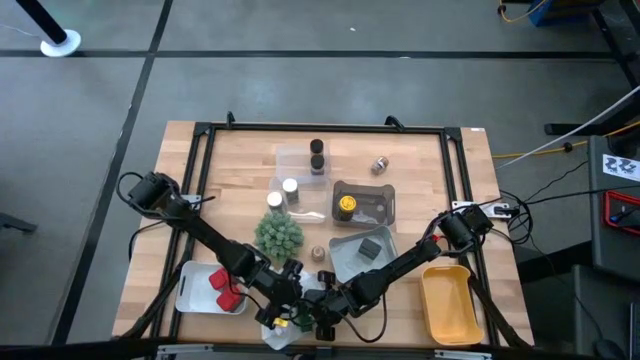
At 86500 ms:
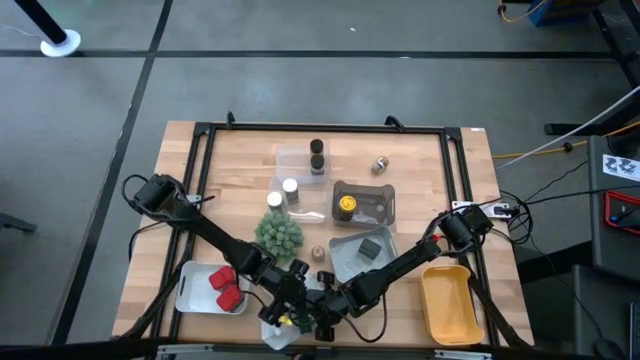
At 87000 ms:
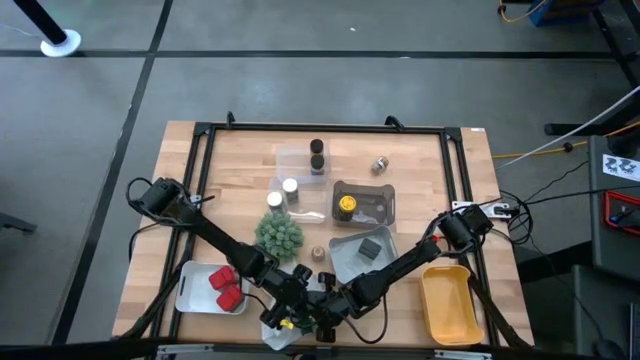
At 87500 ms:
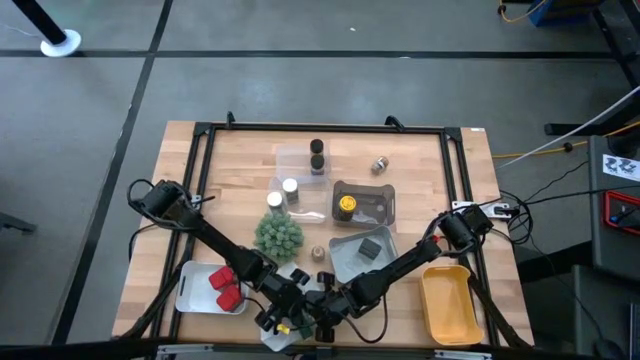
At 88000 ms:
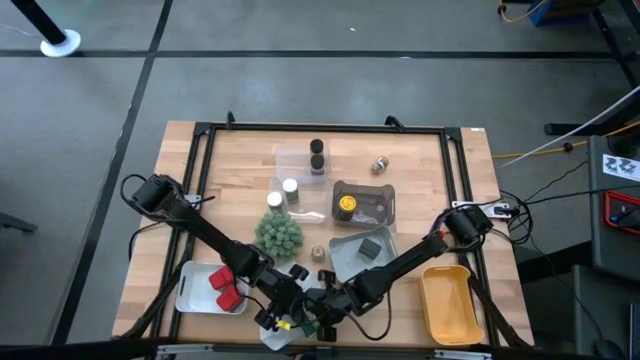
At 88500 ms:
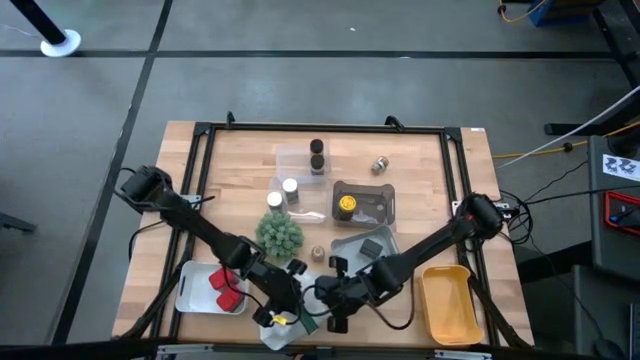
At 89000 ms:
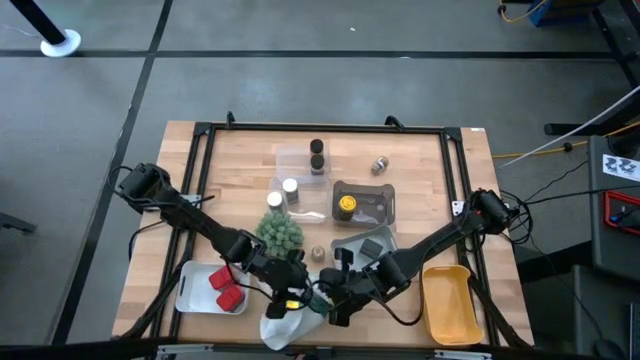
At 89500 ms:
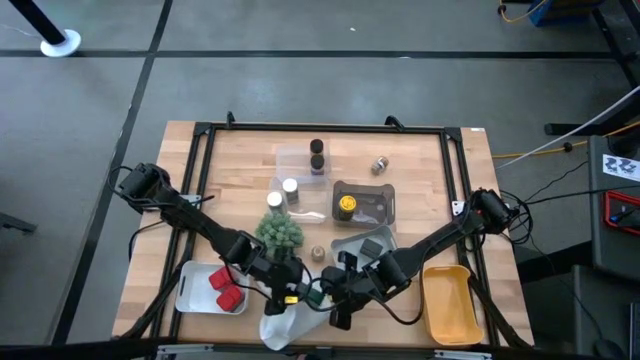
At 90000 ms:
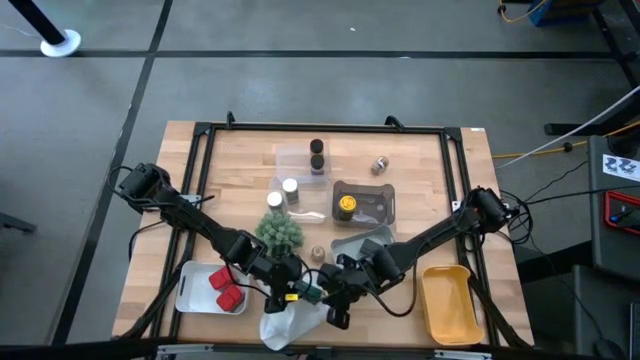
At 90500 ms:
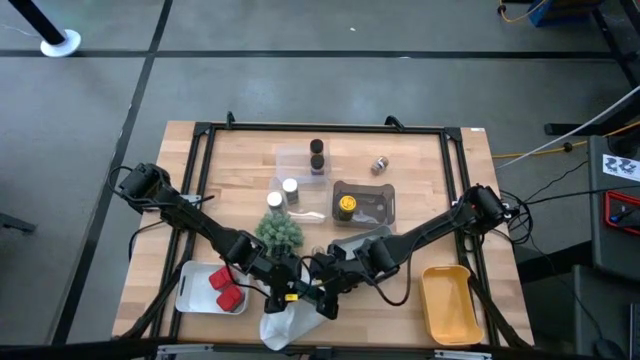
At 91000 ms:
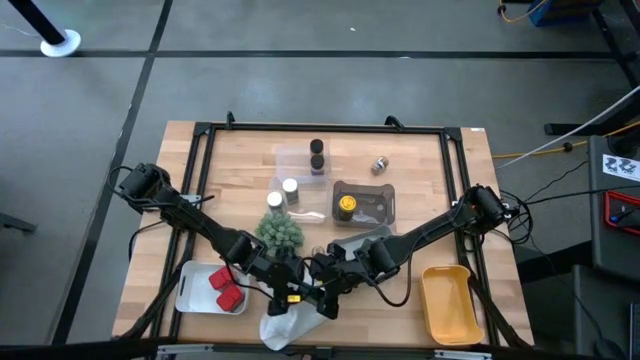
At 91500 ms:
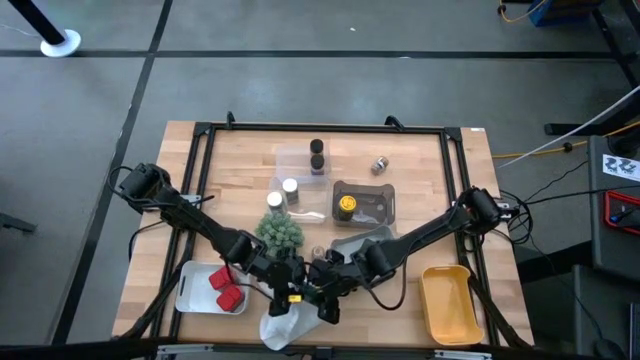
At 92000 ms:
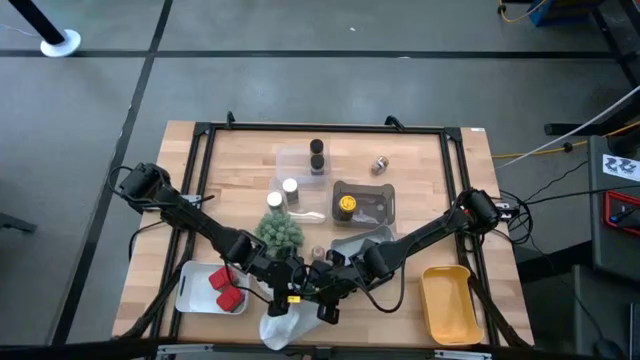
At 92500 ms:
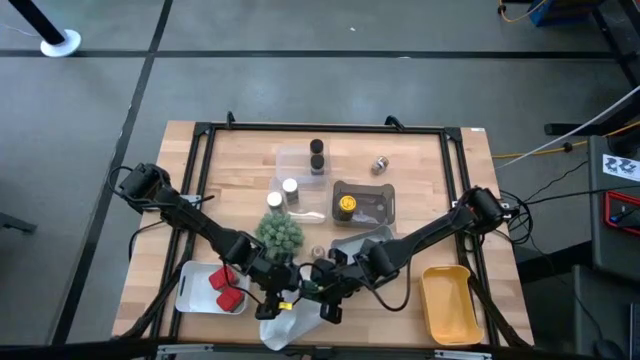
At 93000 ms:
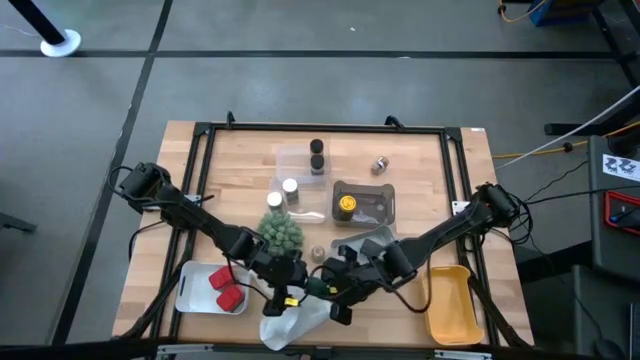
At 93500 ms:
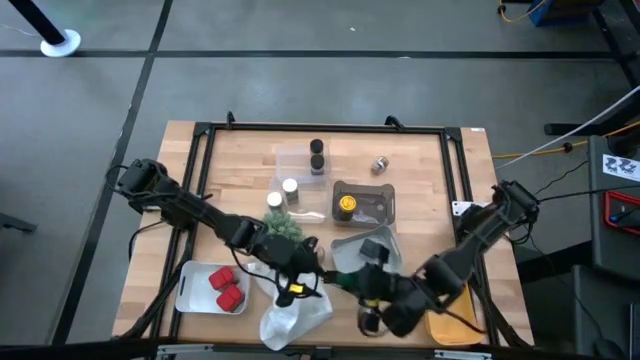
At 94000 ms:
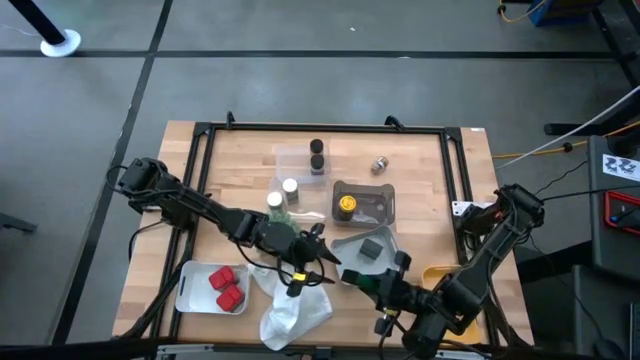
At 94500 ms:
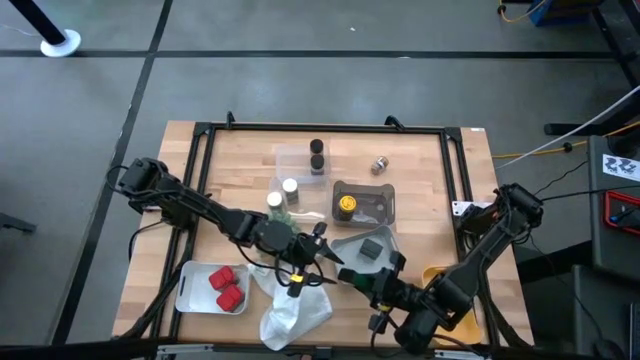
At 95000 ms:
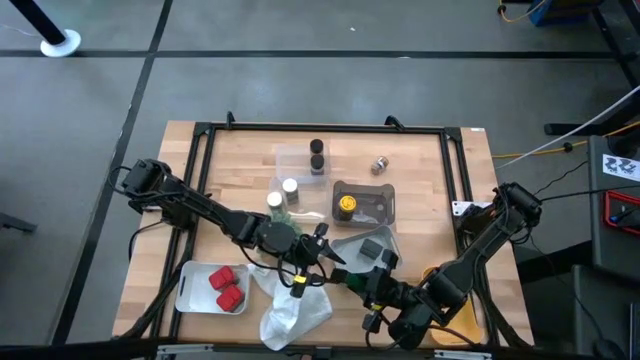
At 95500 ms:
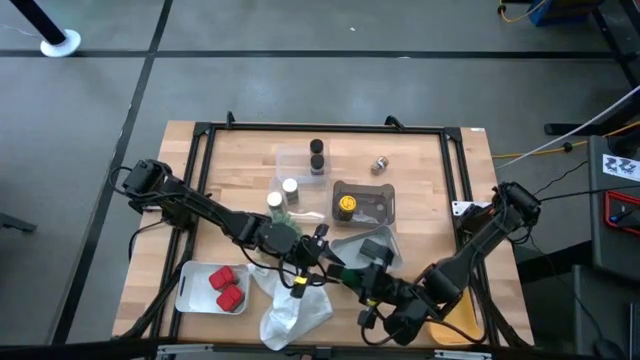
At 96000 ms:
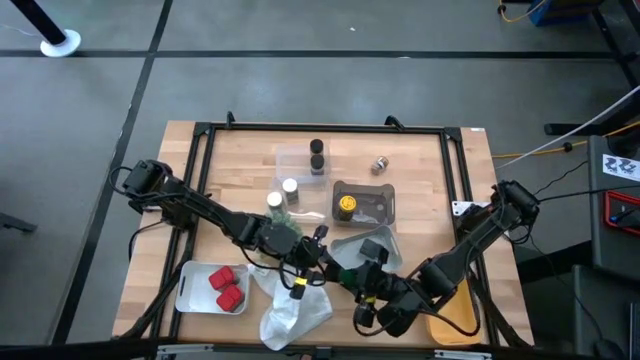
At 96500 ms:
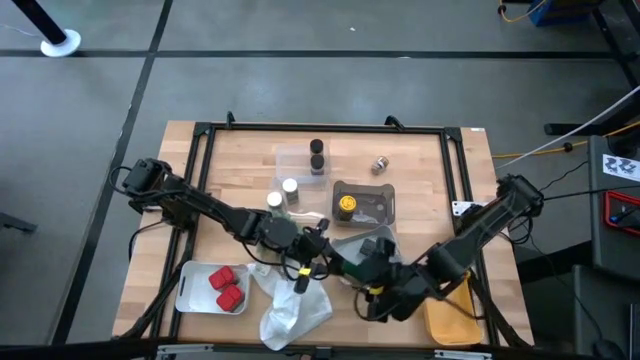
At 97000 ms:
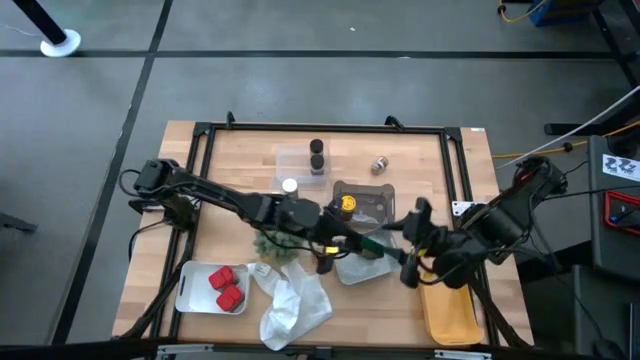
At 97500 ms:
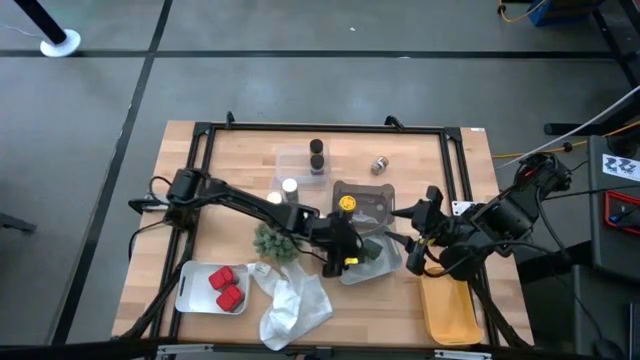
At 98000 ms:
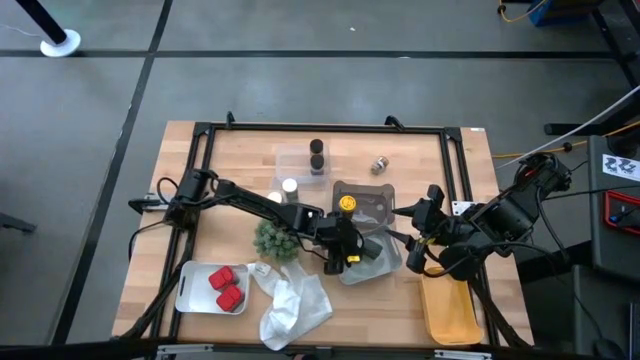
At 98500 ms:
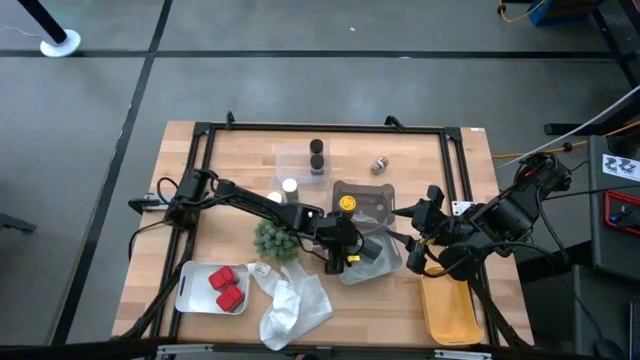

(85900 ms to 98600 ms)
Task: Sort spices by type
Put the green seasoning can into the gray bin

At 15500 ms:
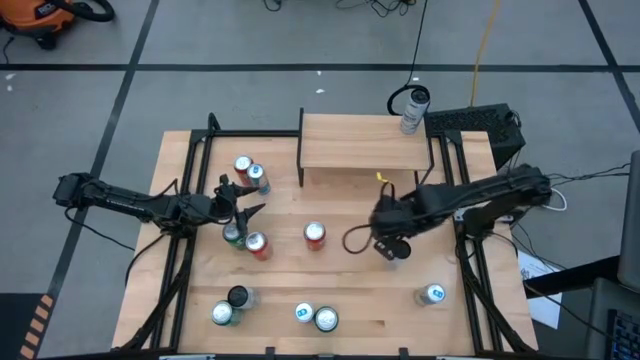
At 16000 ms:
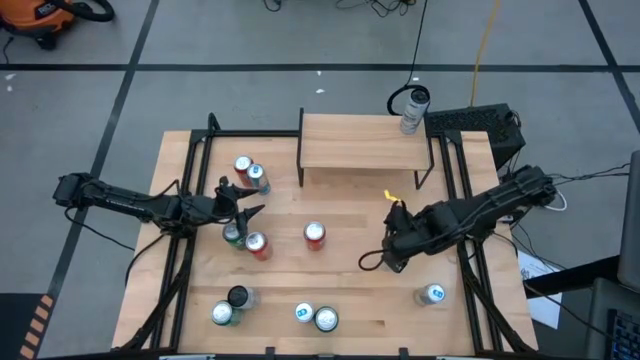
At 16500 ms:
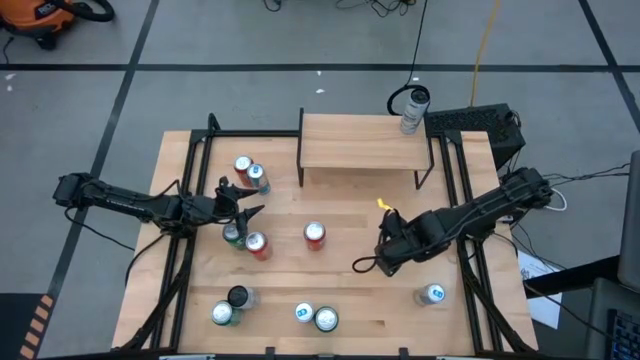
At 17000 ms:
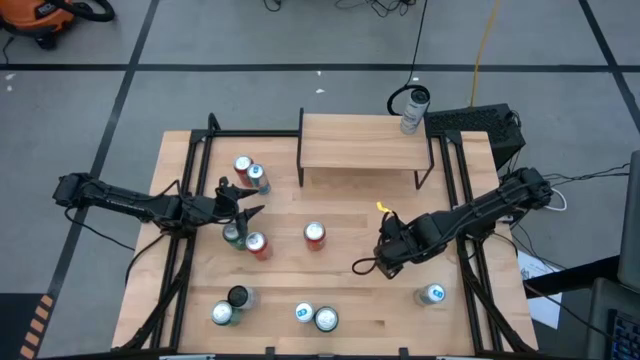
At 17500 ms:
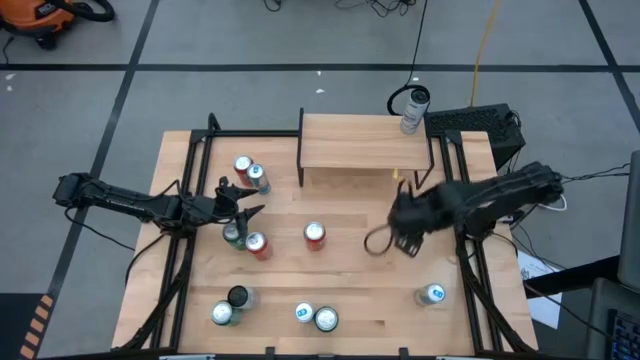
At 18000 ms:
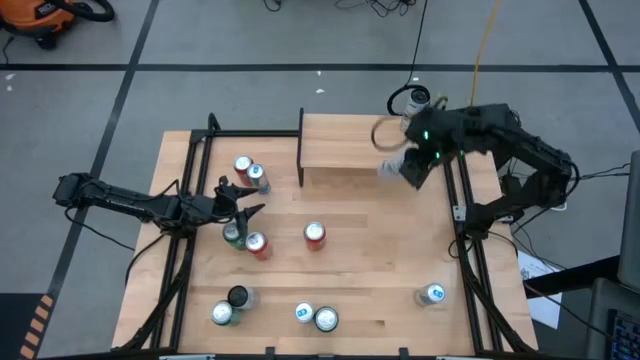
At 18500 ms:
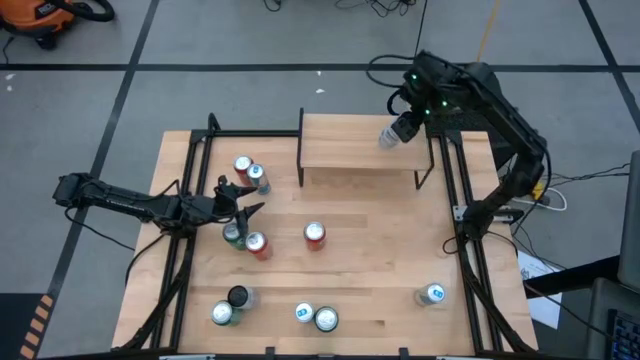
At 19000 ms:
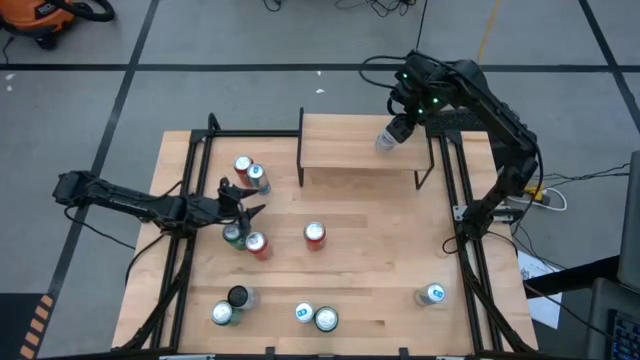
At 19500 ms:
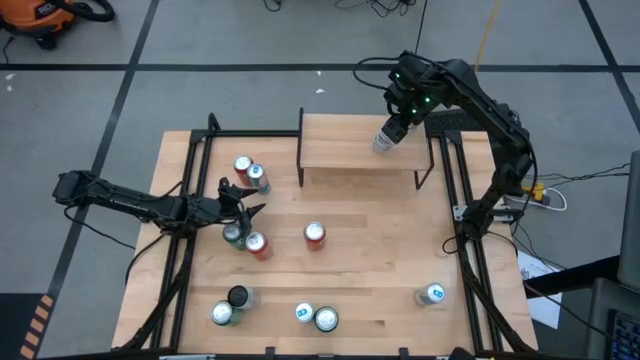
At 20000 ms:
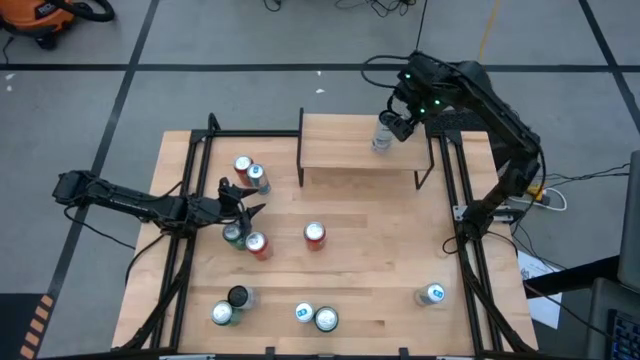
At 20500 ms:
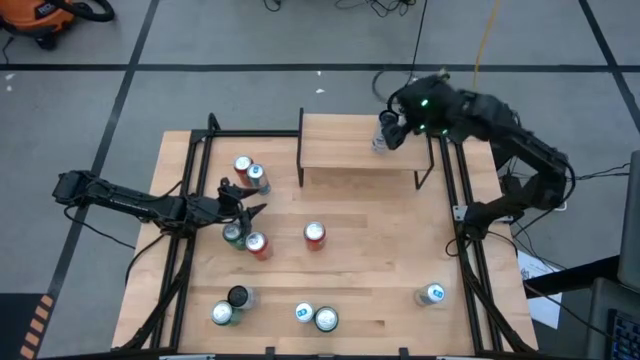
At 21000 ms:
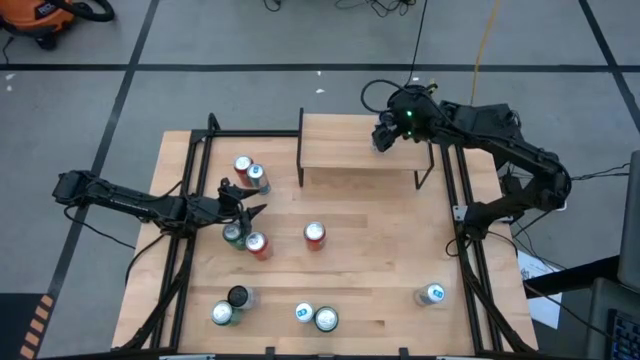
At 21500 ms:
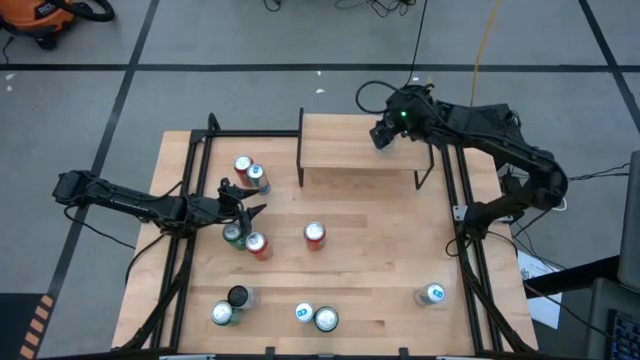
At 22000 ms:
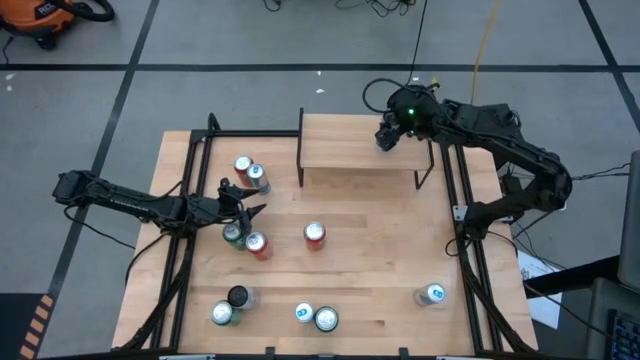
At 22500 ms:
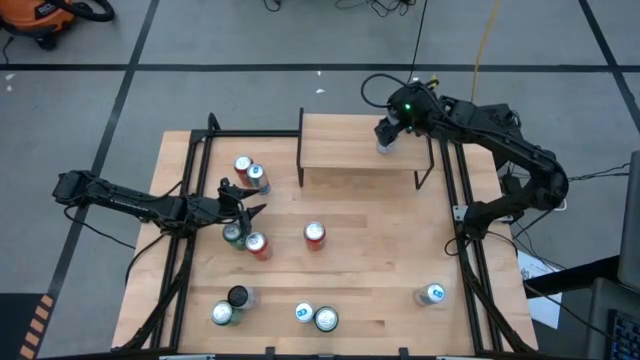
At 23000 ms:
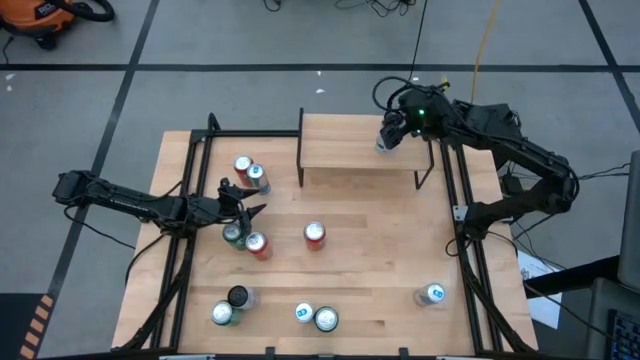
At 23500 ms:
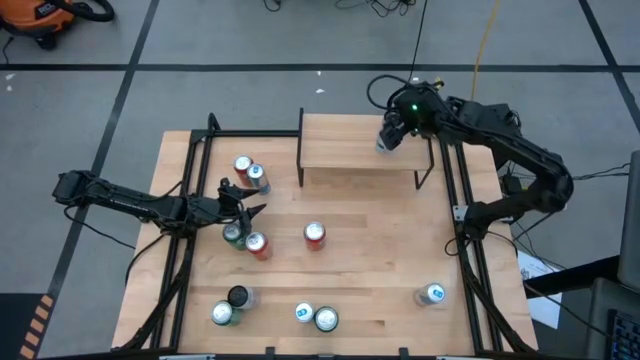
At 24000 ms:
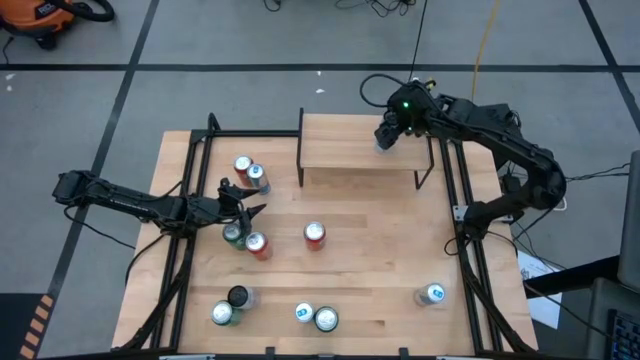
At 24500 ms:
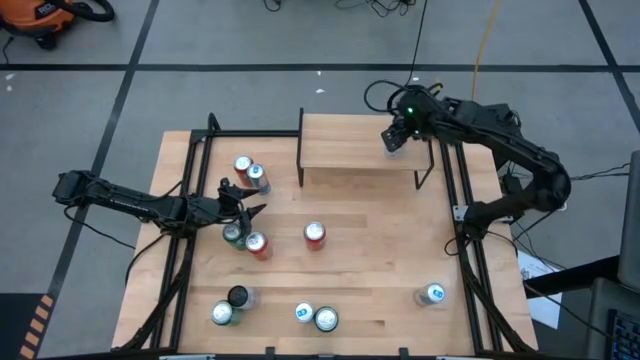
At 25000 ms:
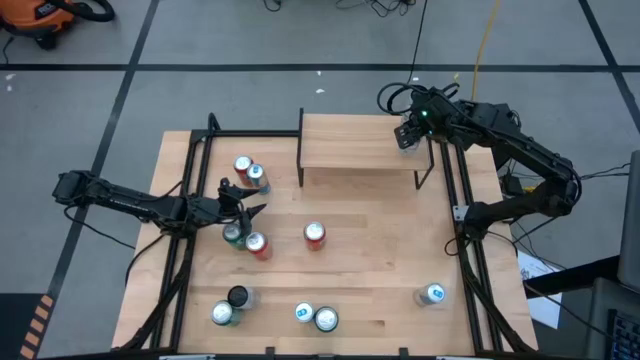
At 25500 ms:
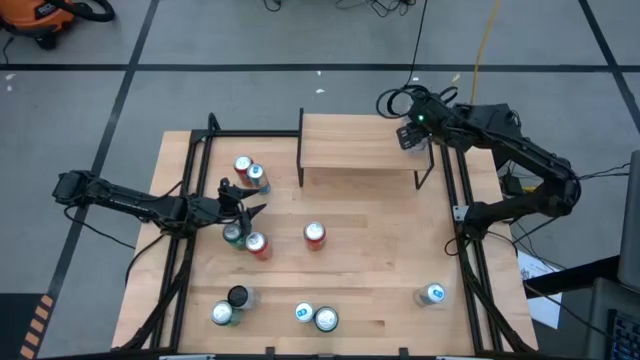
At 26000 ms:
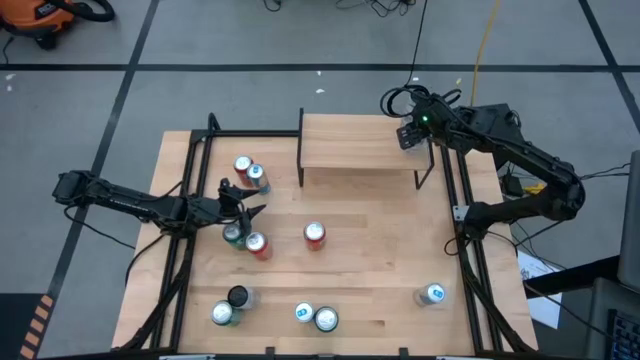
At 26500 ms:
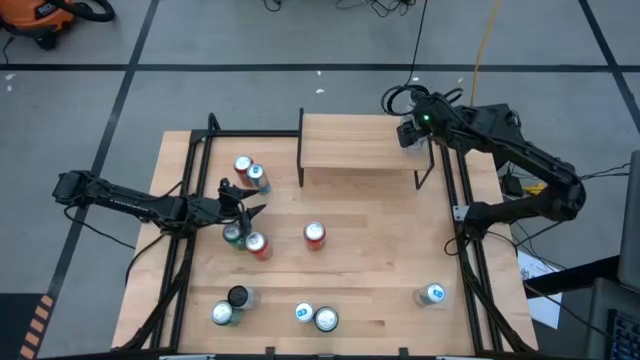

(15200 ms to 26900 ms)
Task: Place canned beverage on shelf
Put the right white blue soda can on the shelf aligned with the other white blue soda can
